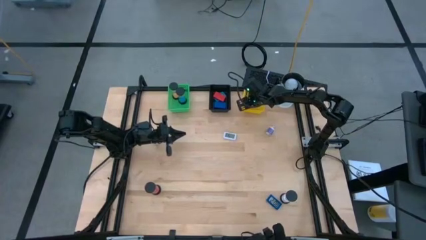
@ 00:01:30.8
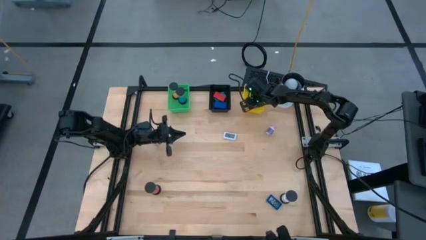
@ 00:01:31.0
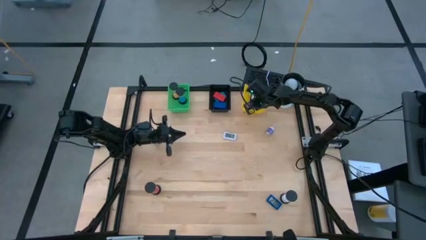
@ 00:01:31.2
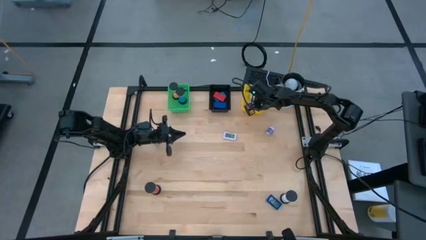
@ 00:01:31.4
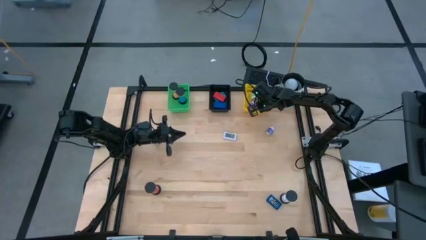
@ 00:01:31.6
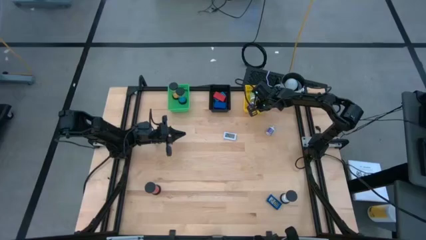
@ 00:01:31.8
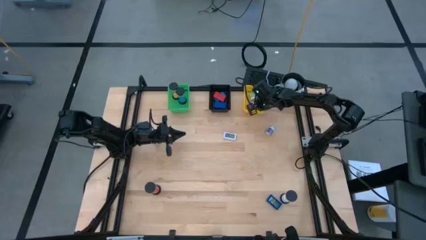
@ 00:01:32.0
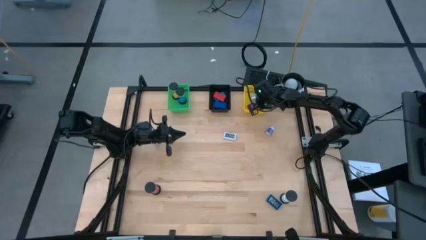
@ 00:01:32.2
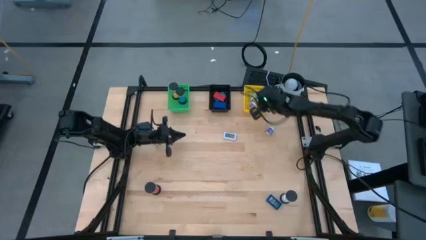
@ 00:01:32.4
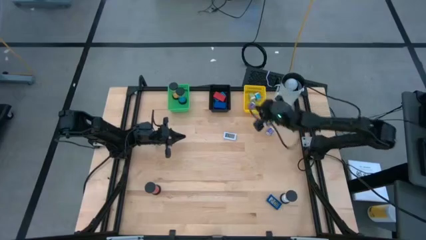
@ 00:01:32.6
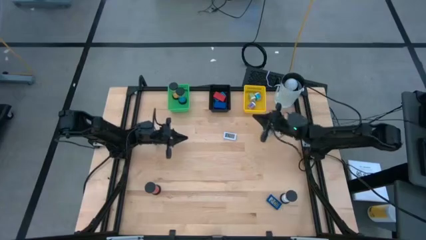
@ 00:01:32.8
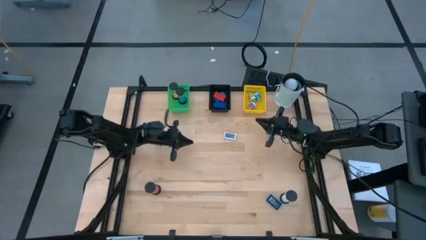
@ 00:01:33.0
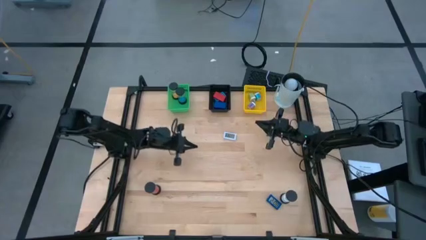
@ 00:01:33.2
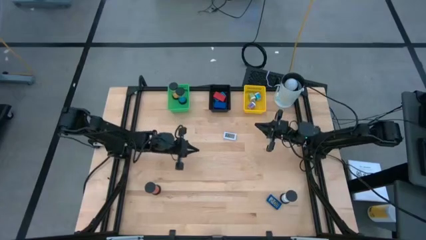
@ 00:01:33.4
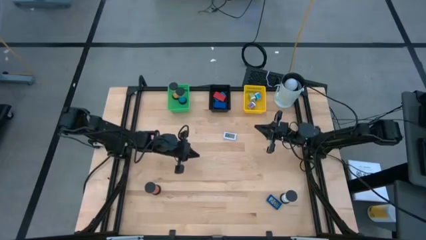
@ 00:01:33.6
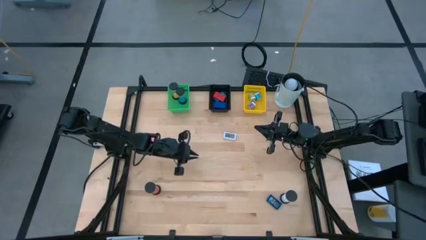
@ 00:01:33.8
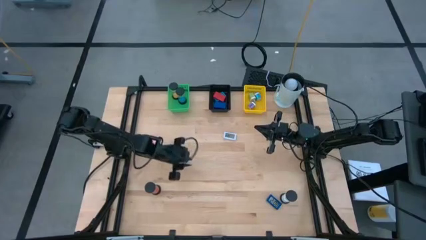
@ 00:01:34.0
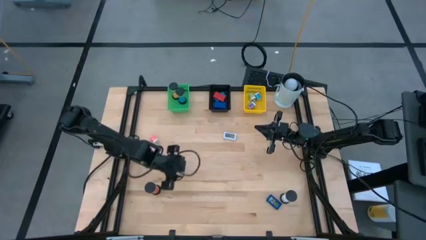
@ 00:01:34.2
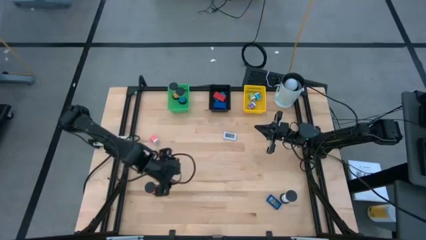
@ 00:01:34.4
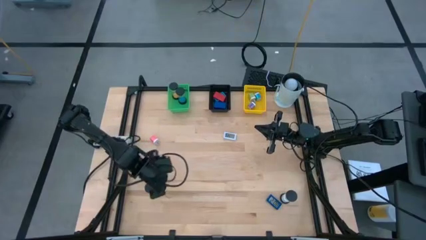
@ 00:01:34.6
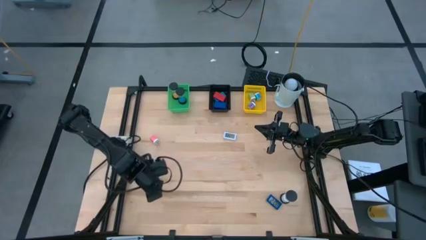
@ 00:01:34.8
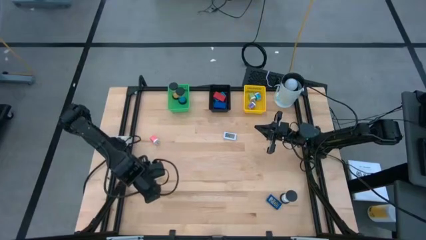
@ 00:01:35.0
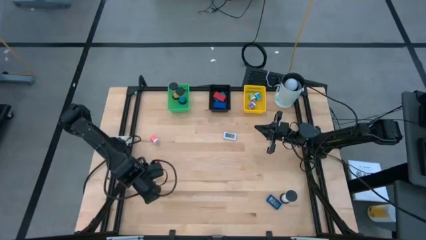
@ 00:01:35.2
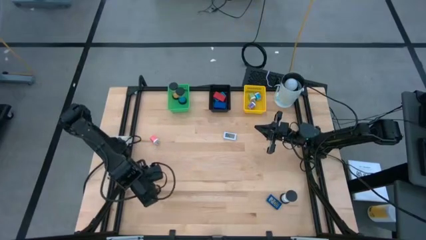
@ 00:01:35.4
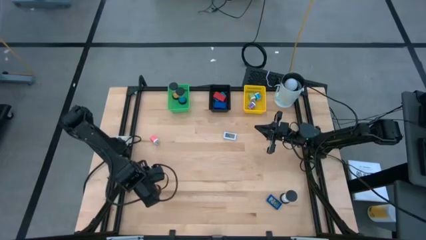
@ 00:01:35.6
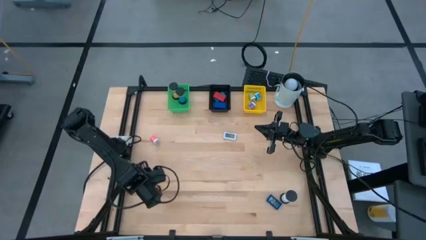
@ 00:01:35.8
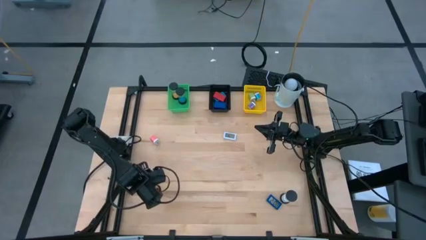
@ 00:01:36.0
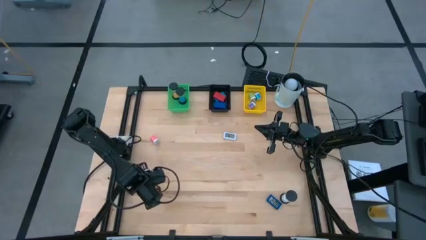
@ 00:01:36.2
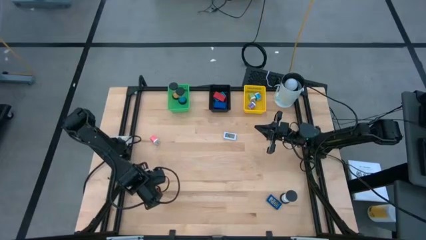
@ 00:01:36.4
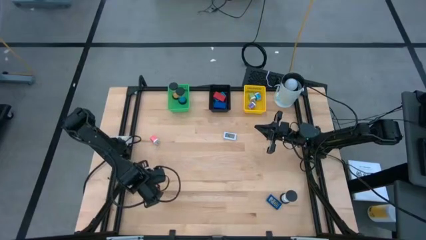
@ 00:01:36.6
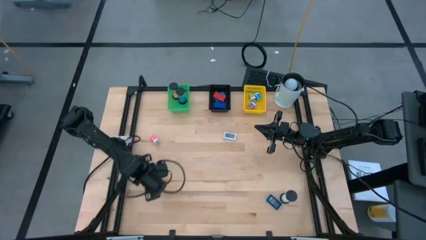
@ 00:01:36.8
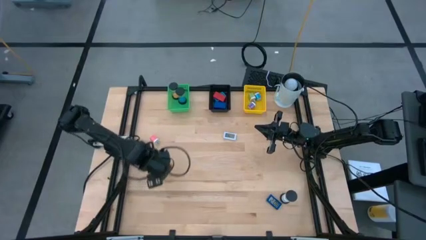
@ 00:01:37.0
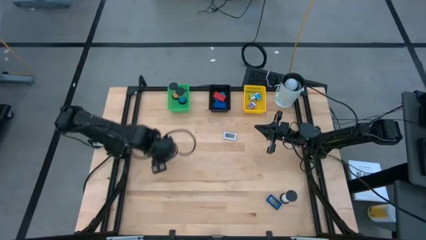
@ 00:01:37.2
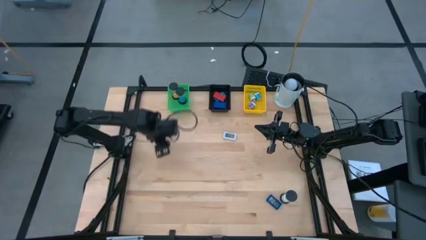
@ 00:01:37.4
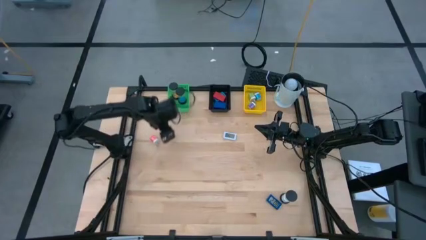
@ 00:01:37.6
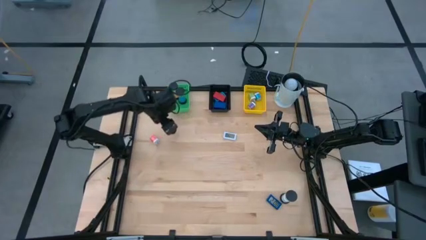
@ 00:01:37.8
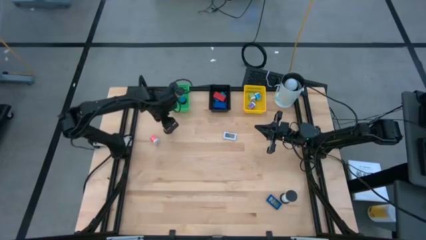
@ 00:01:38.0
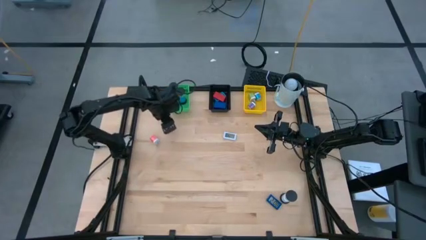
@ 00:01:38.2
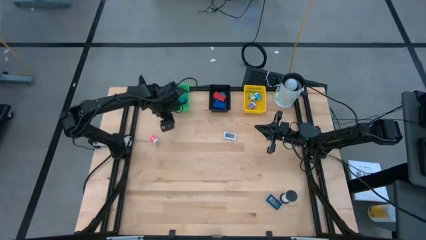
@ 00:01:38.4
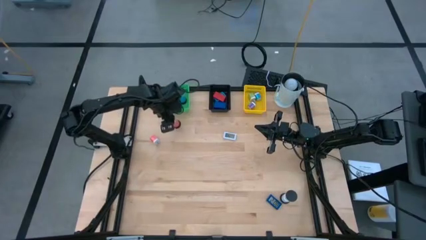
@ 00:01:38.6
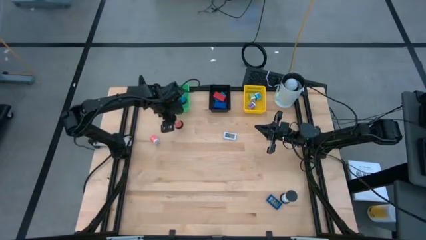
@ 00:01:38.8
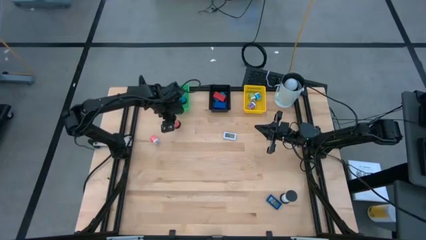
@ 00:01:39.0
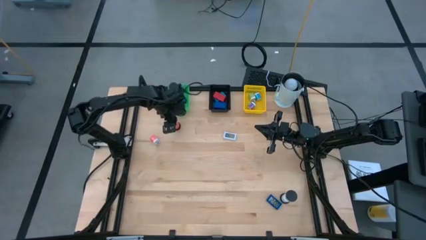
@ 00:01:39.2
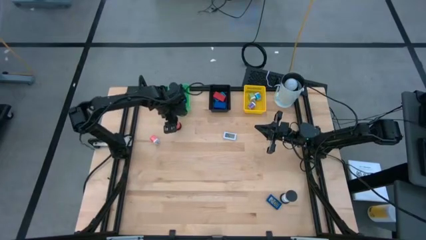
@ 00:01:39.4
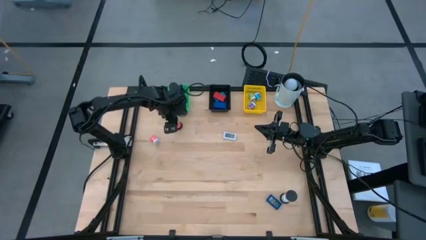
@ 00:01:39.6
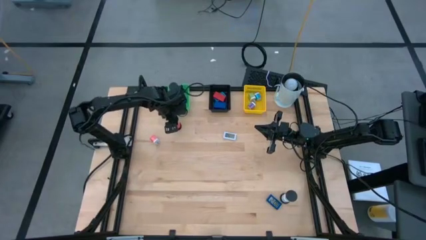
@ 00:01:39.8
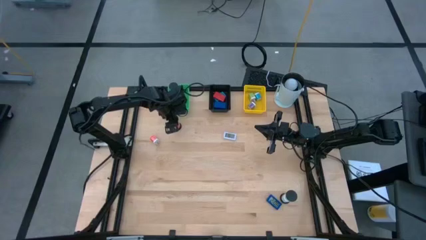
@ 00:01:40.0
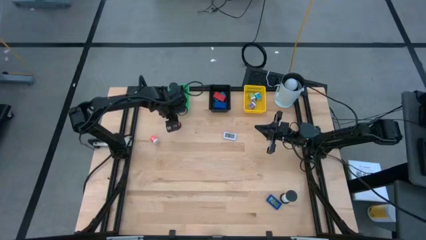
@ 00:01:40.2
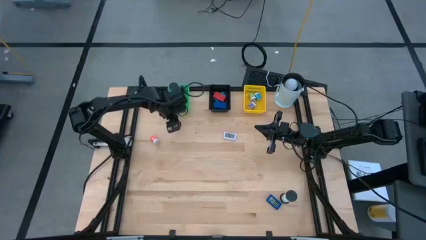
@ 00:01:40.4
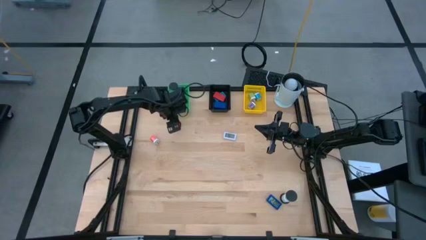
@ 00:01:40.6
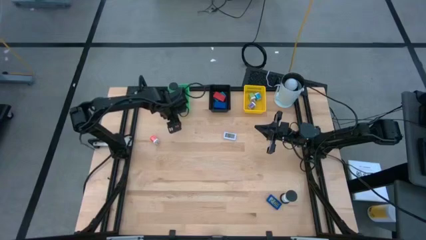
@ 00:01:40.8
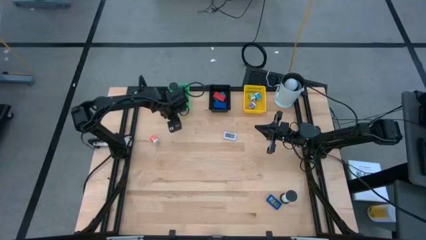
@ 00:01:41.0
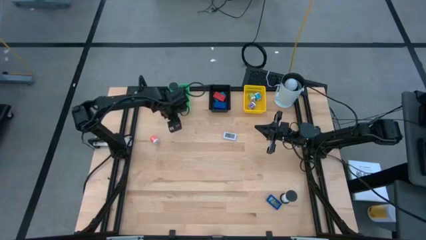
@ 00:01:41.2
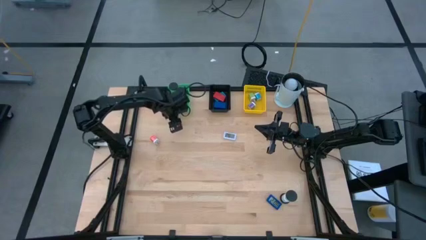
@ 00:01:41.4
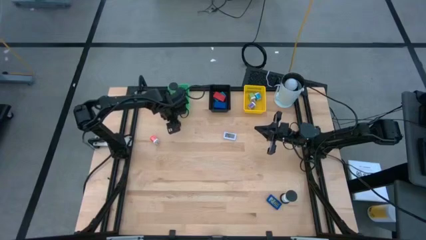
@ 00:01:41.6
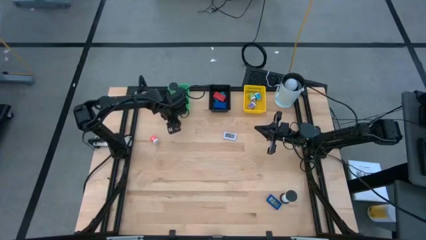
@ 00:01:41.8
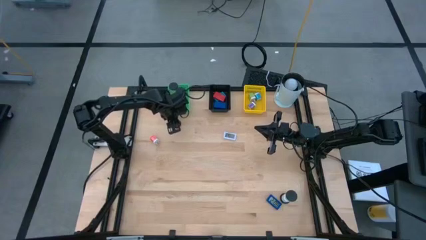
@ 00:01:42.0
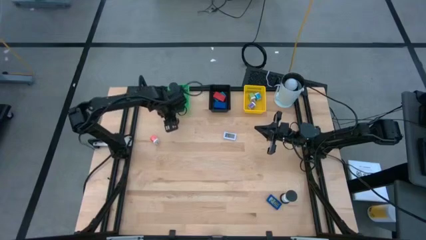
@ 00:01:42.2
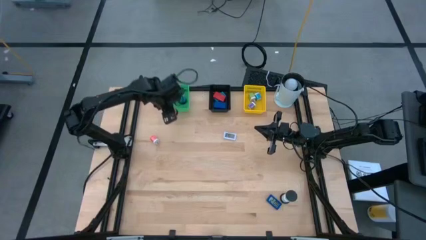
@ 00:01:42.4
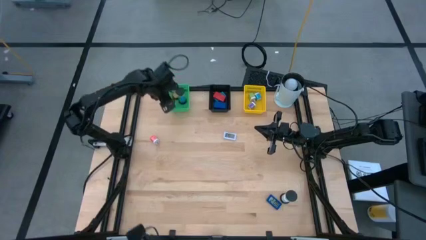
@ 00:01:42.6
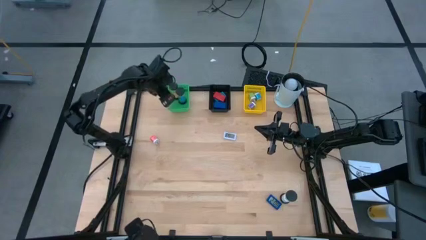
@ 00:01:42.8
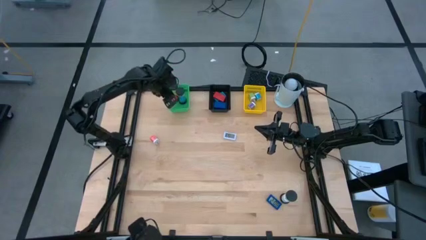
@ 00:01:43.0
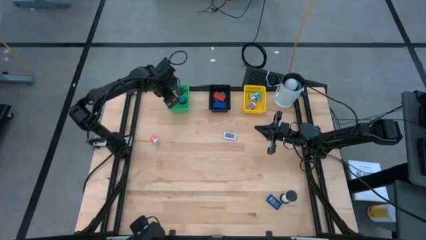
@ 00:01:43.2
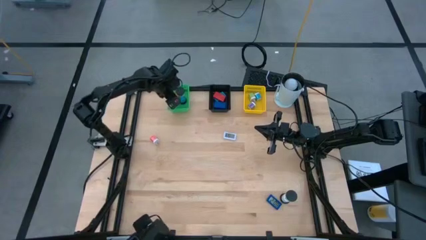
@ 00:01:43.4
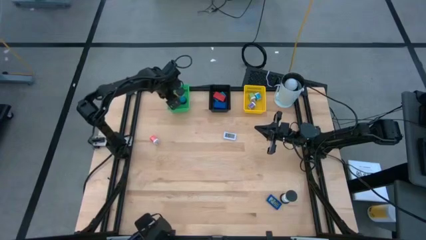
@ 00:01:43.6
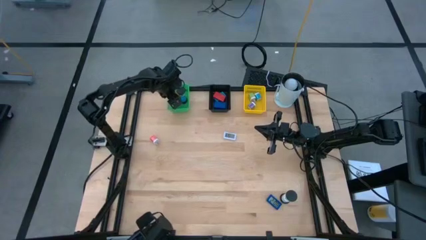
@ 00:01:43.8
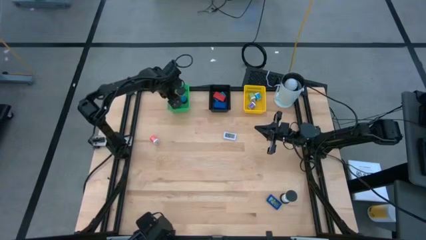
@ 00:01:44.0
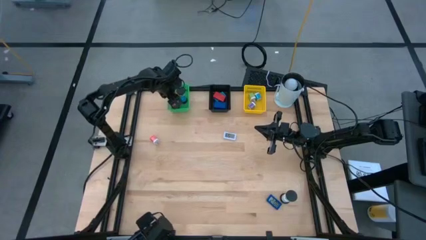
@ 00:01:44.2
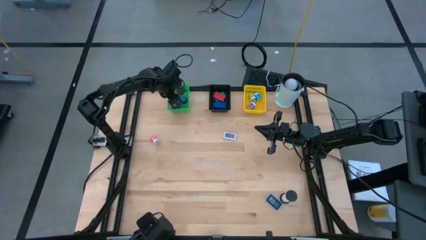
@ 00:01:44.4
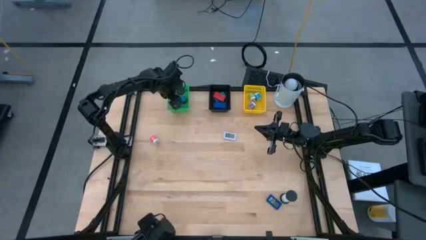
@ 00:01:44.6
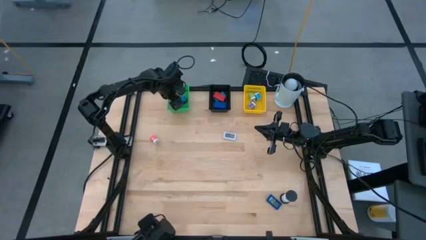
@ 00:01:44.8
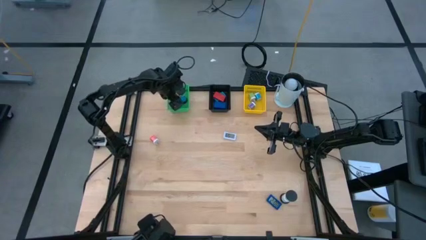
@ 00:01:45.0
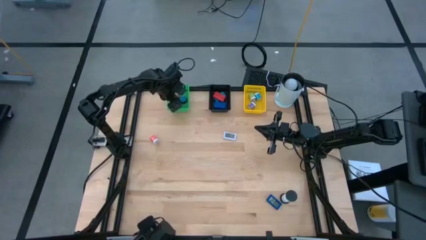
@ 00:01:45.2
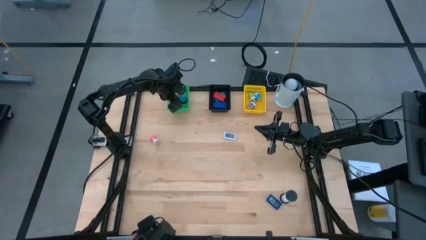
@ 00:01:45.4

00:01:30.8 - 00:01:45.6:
Task: Pick & Place Office items
Put the red hourglass into the green bin

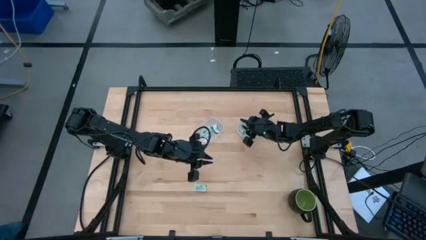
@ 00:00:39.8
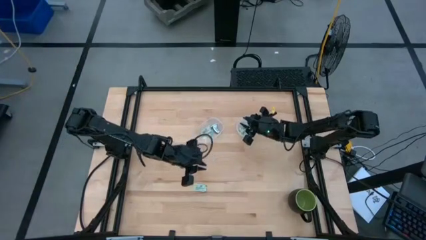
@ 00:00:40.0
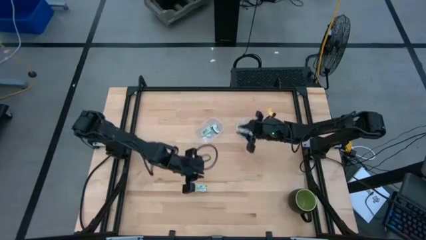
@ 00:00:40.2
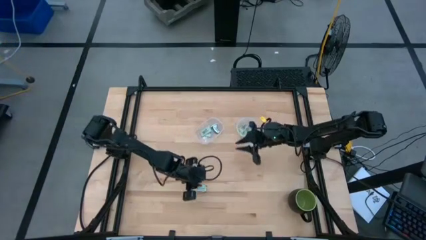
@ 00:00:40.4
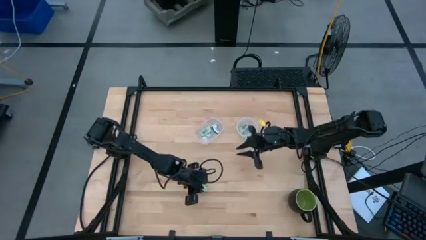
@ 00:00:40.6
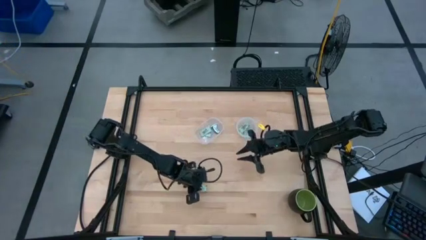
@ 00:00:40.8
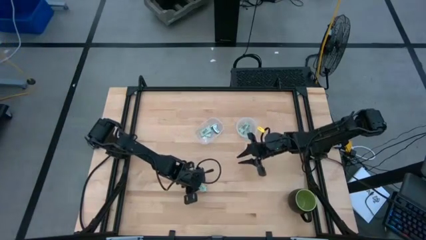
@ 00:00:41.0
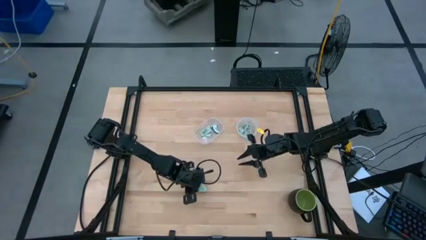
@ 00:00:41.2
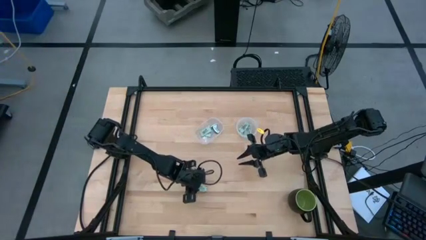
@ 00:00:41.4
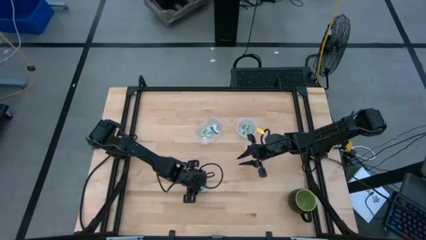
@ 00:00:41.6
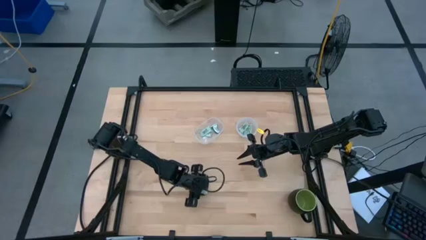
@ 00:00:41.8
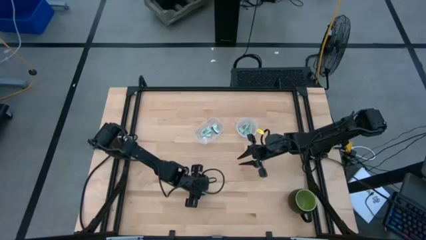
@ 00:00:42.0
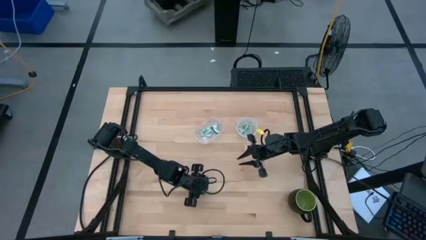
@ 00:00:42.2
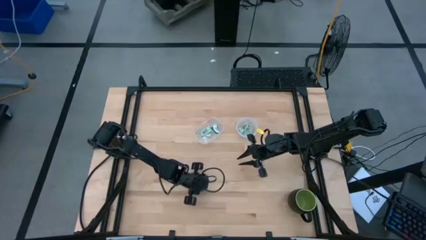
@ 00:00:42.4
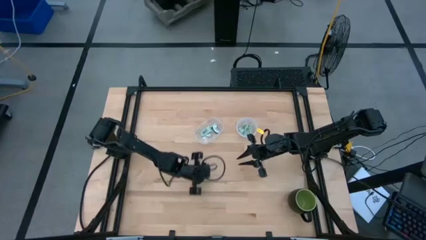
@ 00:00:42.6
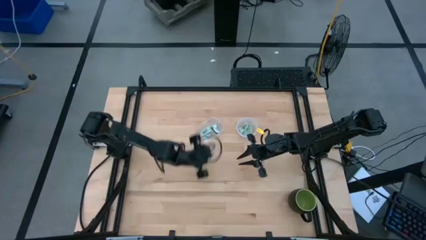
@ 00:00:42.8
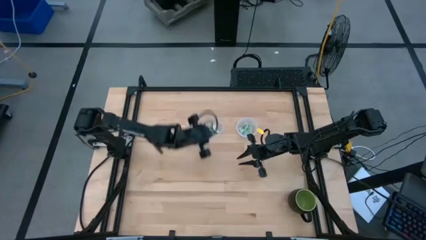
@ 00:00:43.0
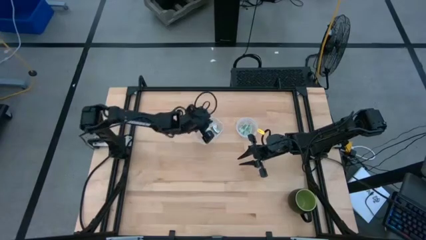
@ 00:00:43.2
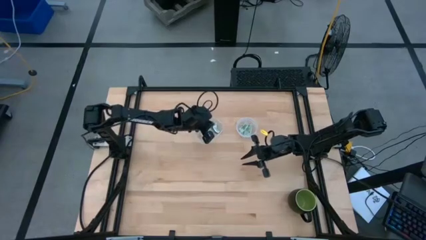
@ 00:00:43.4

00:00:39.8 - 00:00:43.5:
Task: Pick and place Stevia / Truvia into bins
Put the stevia packet into the left transparent container
